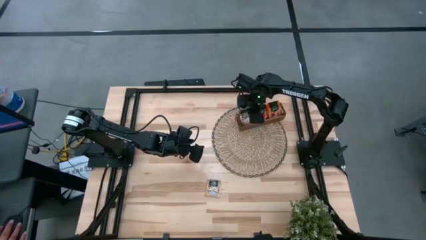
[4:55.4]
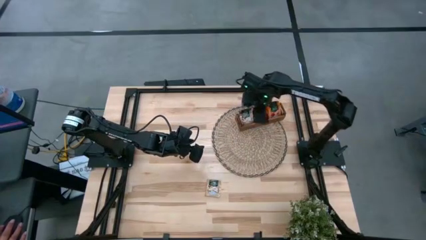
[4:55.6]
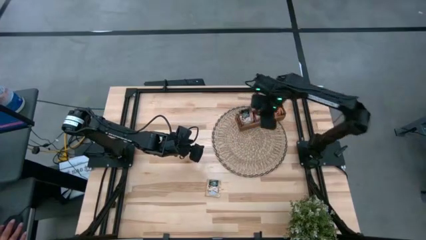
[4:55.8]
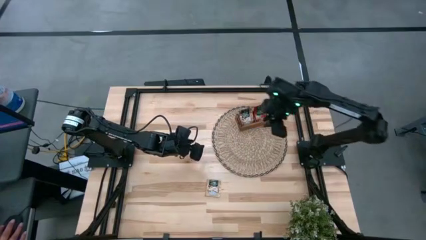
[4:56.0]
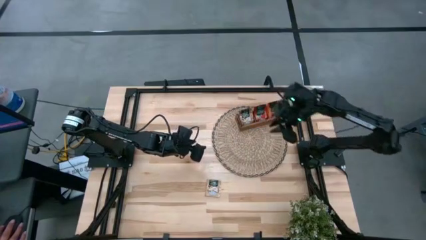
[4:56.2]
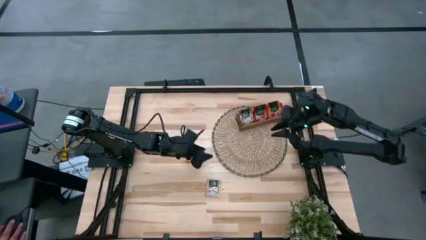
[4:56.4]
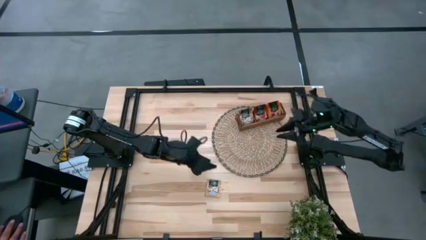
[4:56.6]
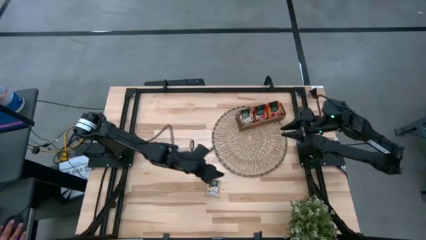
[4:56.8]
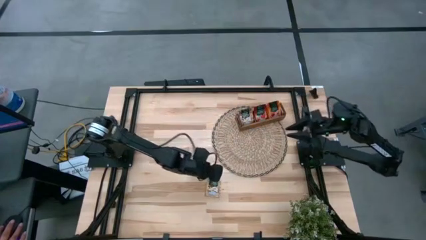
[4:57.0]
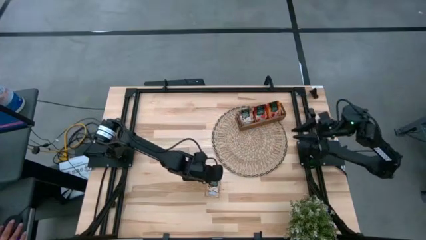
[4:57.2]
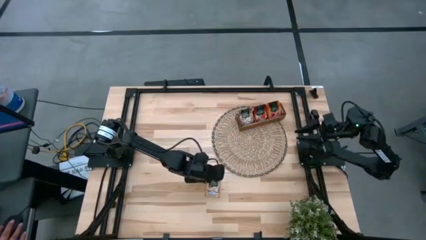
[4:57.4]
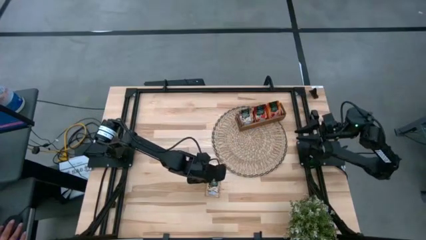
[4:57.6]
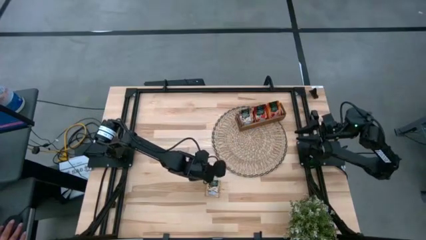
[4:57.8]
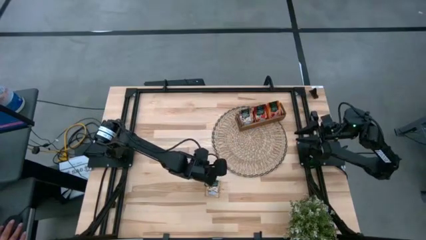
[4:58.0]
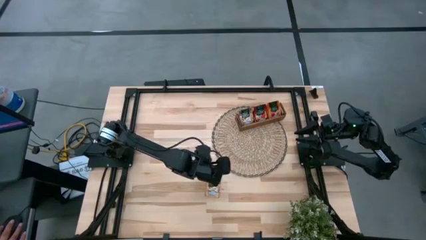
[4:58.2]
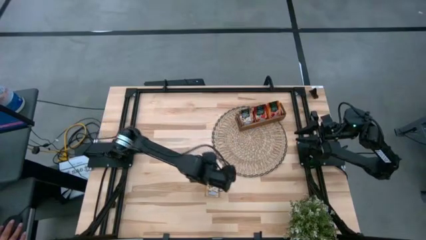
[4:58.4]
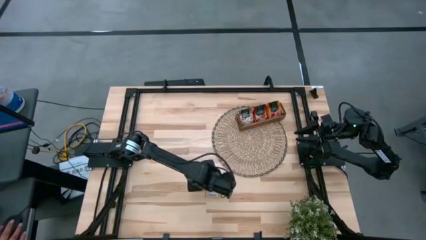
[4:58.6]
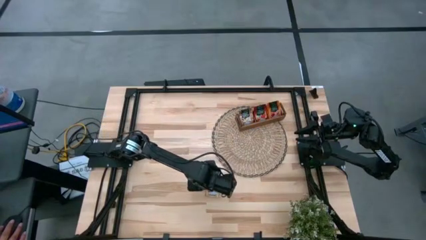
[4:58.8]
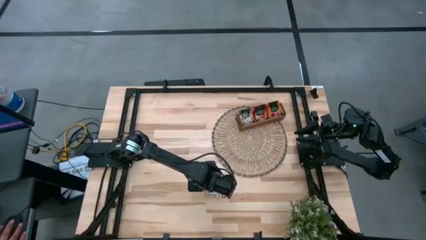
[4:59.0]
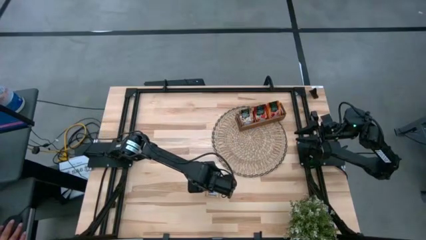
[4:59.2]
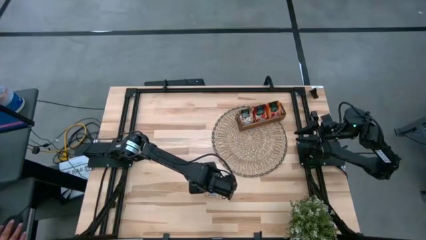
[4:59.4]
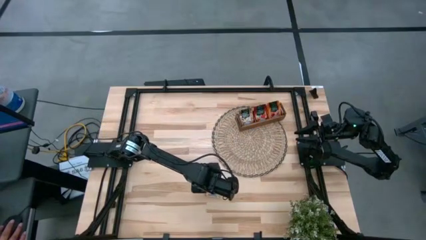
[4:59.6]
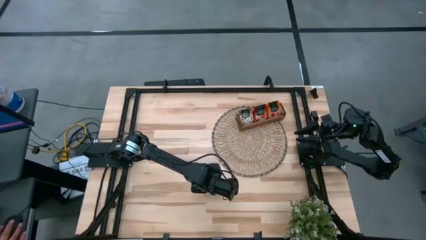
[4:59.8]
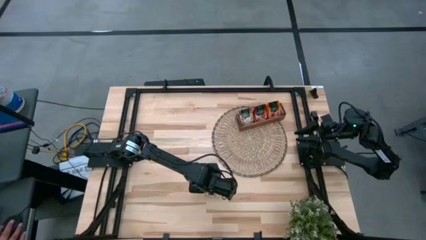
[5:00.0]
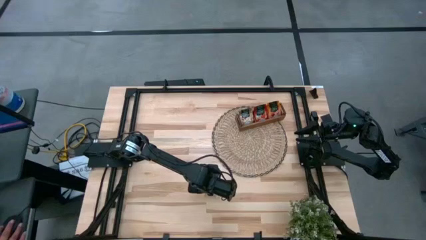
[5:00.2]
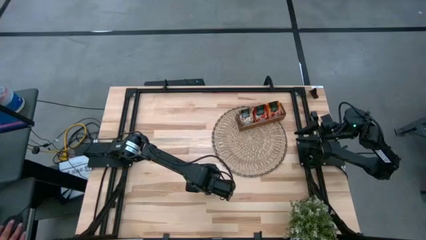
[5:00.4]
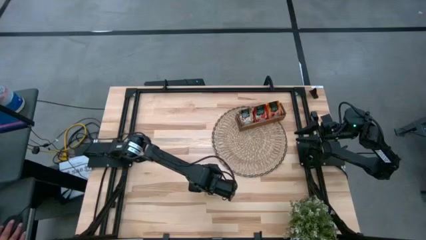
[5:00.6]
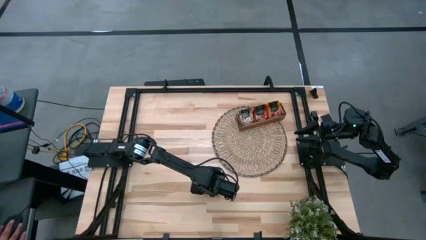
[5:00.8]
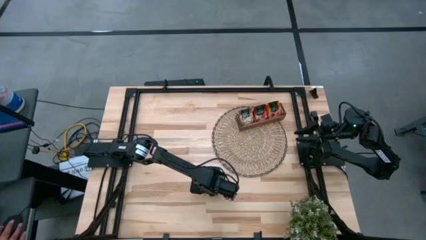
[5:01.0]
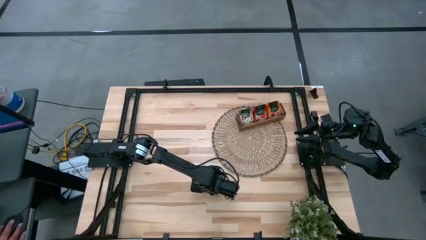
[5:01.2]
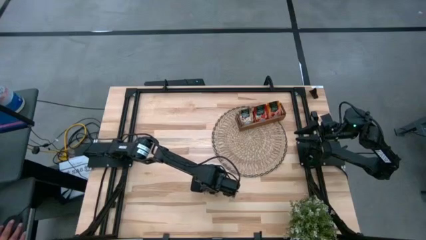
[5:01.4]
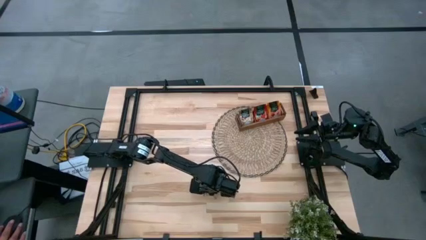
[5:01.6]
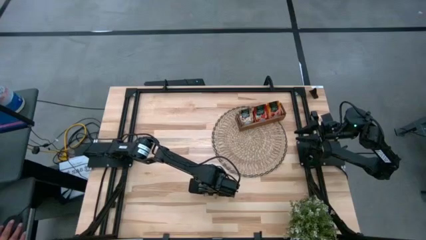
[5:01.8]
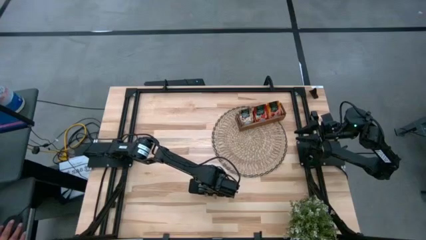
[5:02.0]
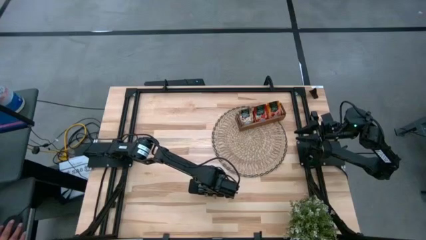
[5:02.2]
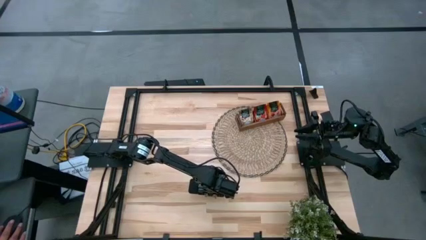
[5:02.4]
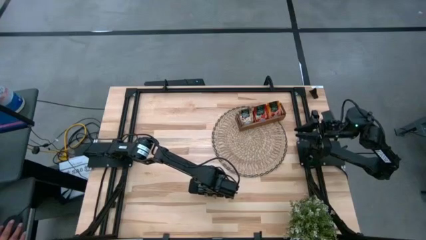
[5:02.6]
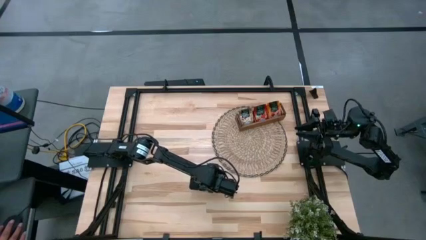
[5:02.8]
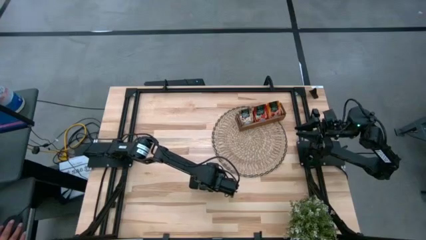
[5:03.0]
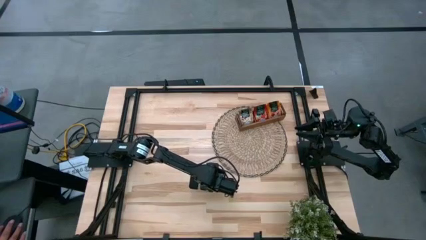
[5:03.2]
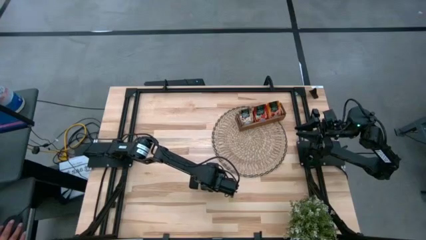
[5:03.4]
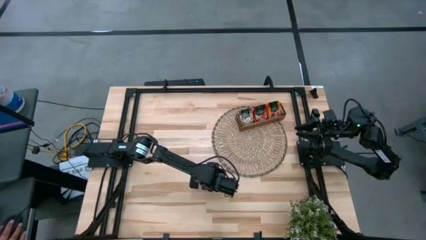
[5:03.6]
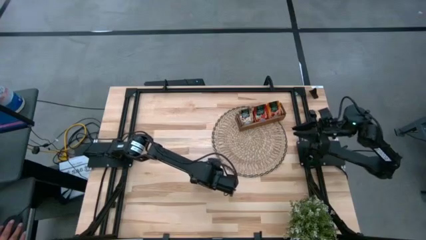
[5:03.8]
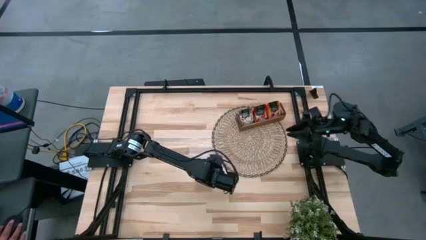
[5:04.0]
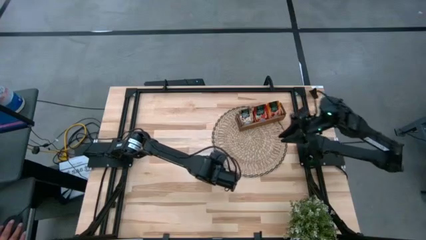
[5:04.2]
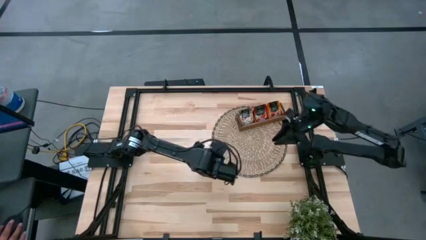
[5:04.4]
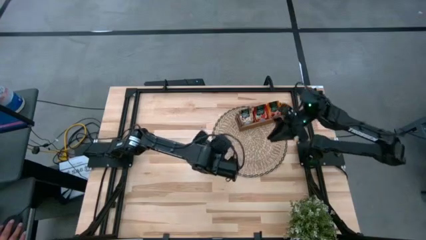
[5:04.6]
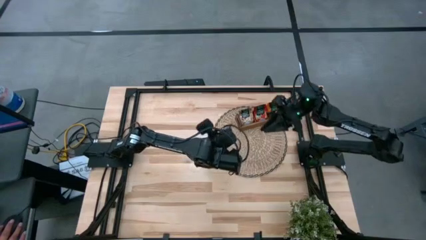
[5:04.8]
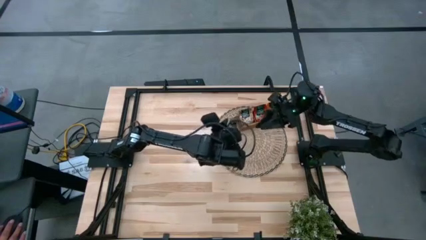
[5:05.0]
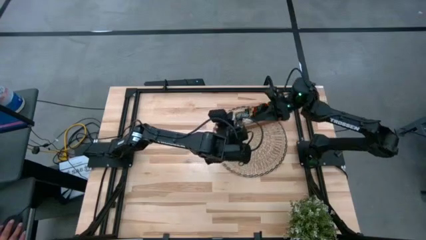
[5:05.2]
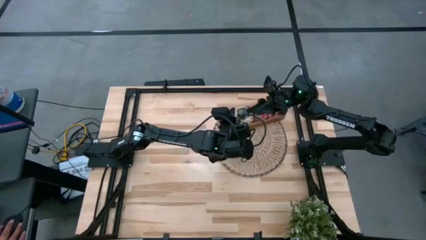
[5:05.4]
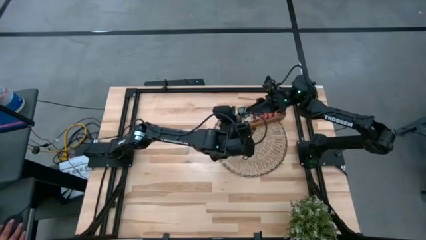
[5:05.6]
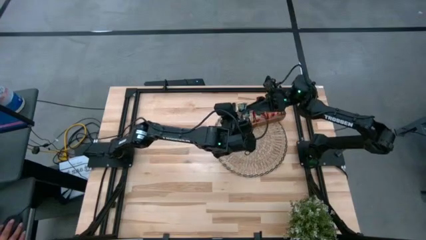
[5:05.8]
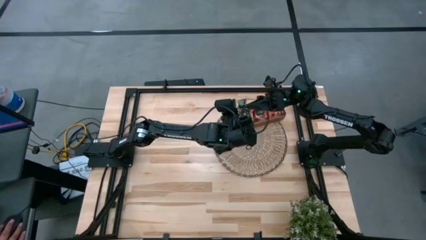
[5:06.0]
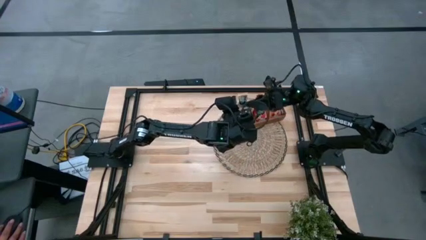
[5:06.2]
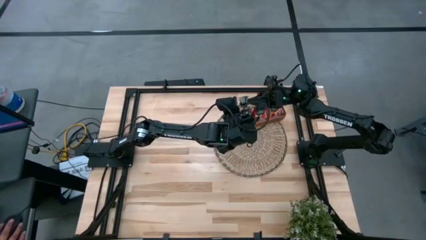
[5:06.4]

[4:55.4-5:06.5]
Task: Pick & Place Tea
Put the brown tea pack into the brown organizer
